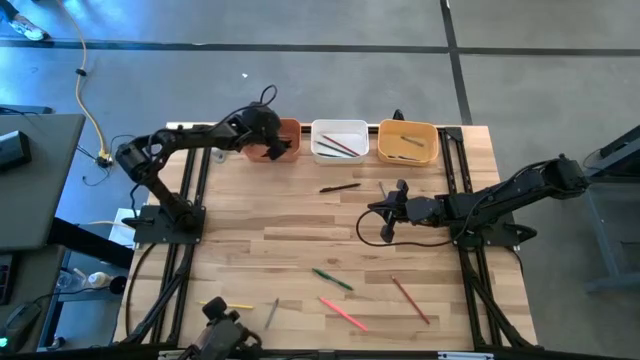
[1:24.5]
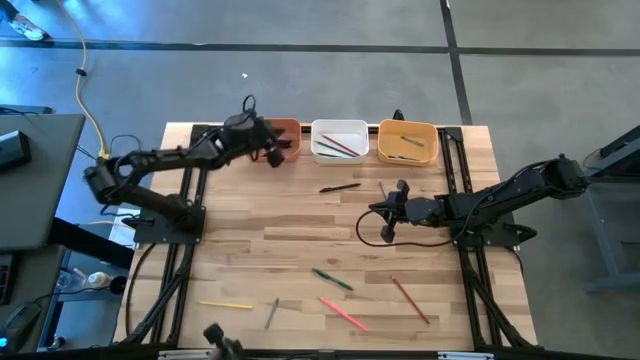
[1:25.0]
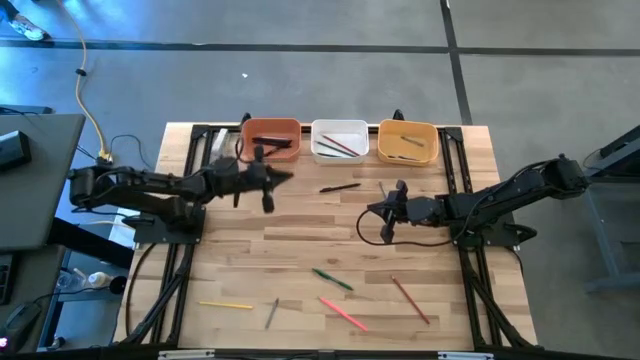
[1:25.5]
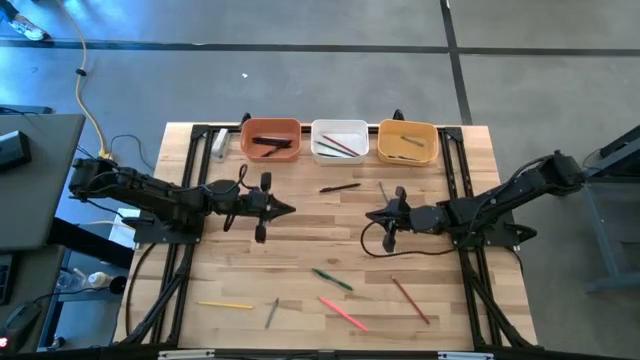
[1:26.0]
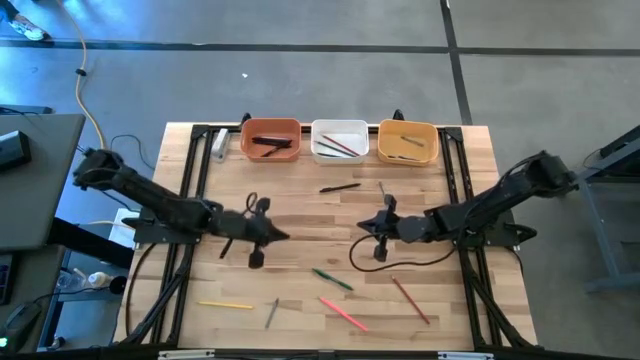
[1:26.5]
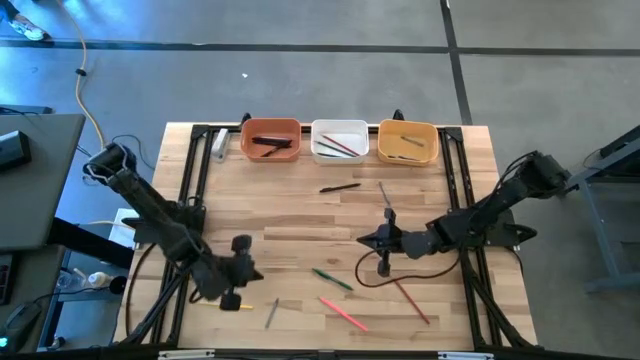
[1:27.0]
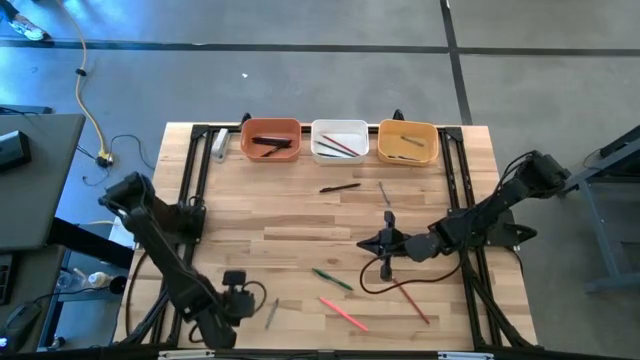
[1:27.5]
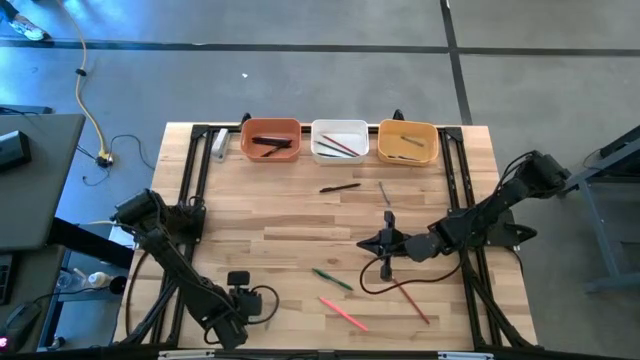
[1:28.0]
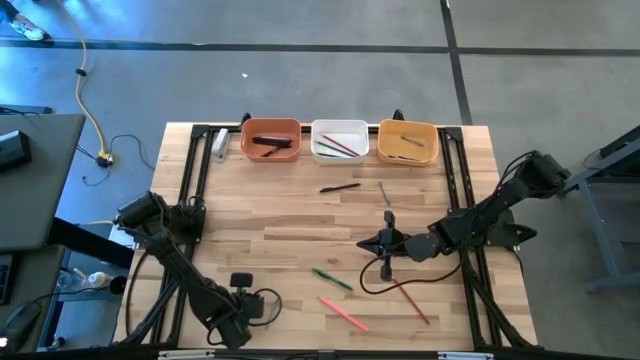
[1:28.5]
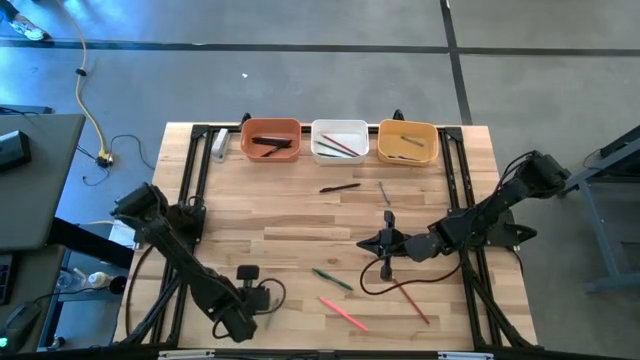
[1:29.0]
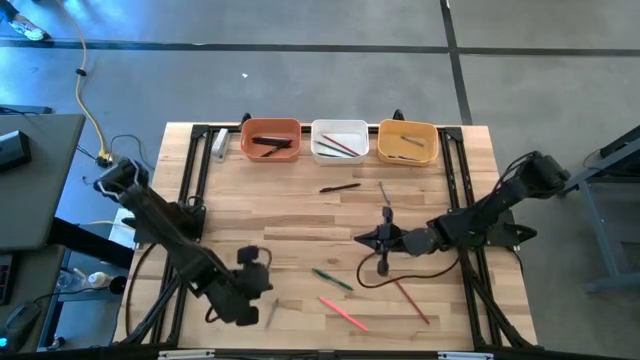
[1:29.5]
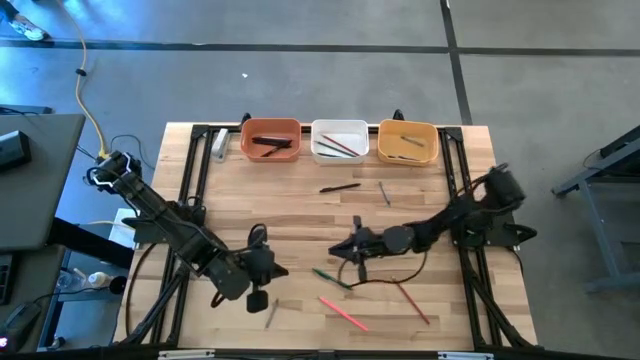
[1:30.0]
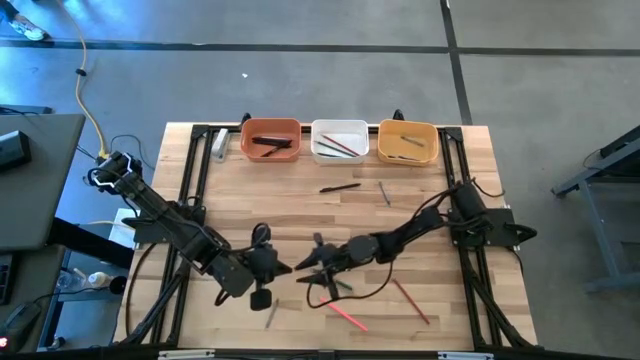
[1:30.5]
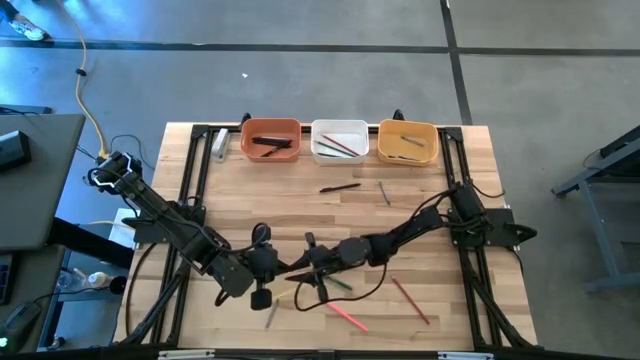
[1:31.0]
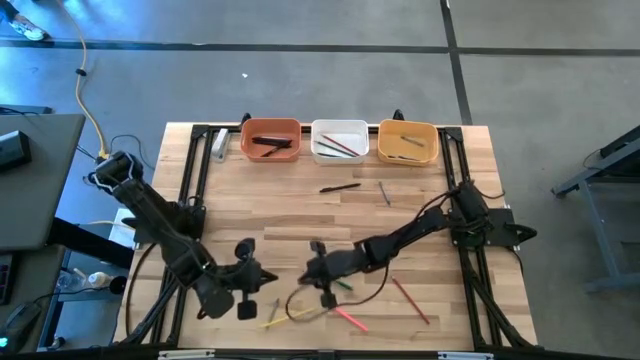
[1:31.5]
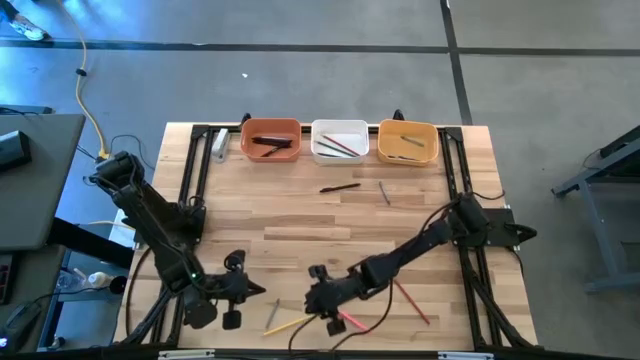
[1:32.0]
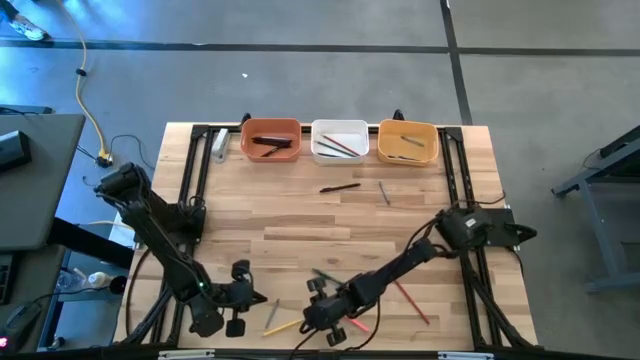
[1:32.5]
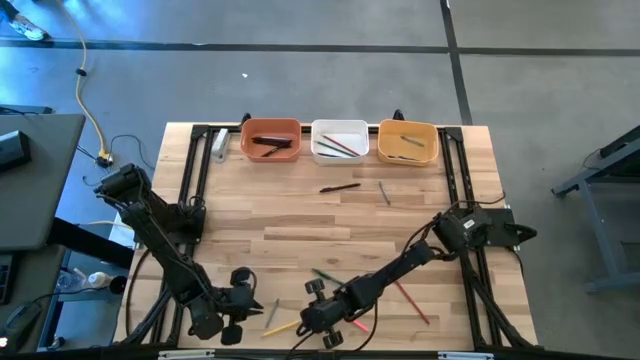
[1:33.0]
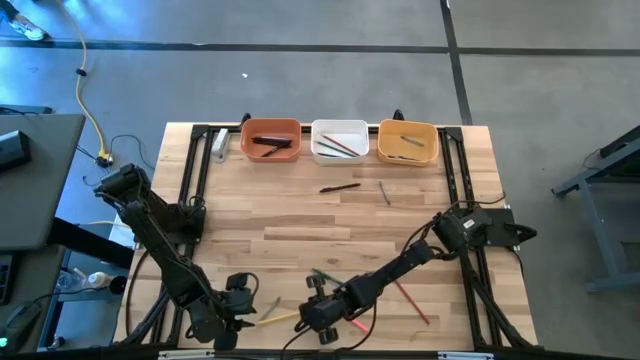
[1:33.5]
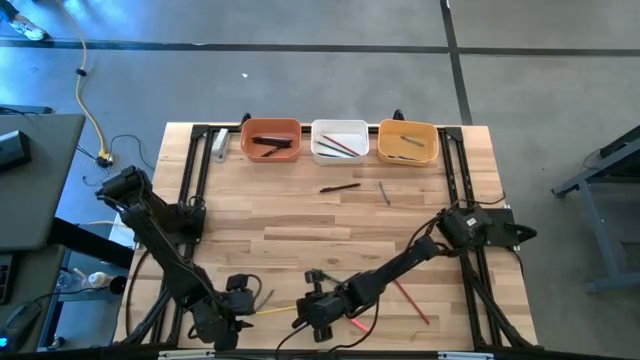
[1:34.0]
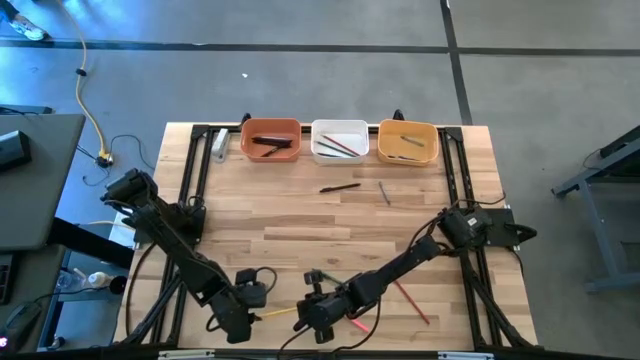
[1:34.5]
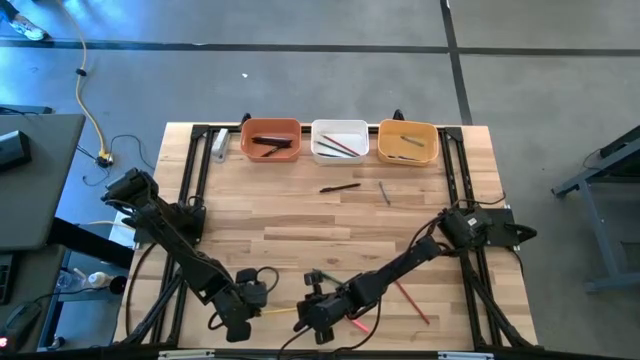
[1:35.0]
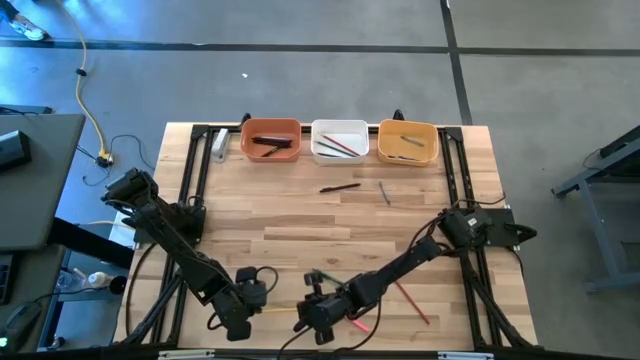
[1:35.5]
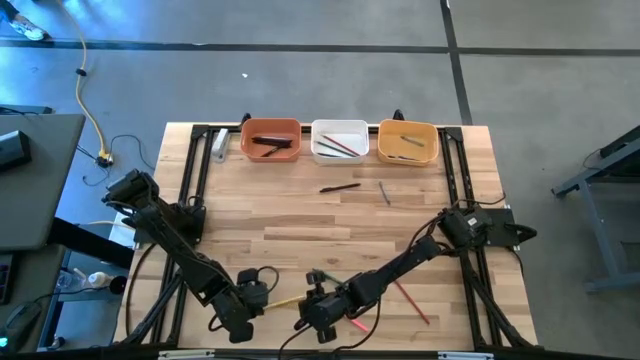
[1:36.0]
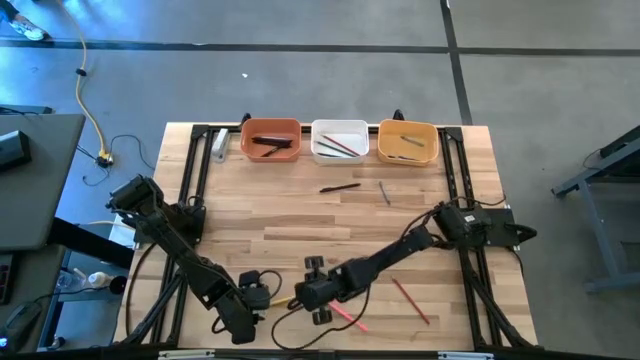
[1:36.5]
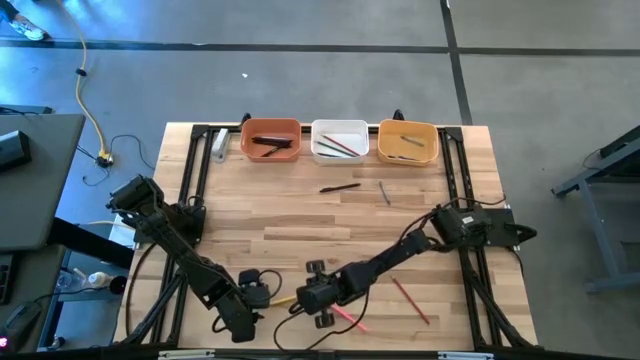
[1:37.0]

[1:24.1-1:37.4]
Task: Sort crayons/erasers/pens/pencils in bins
Put the yellow pencil into the white bin

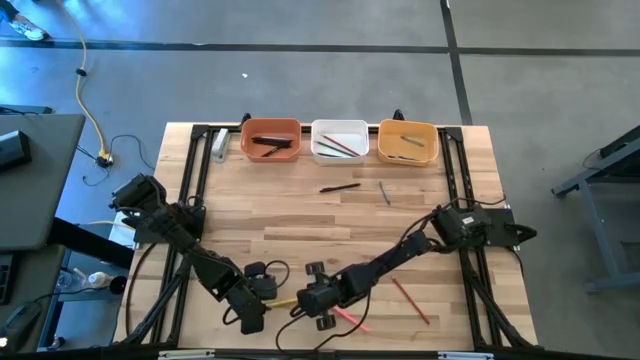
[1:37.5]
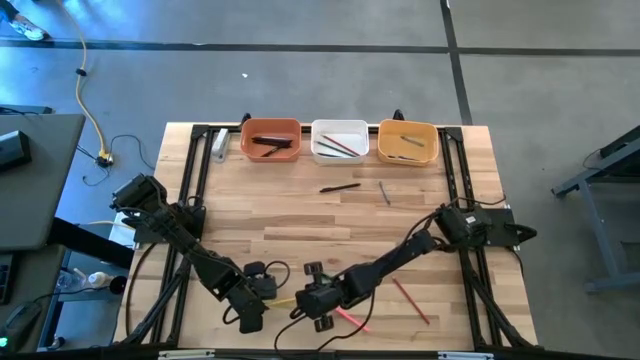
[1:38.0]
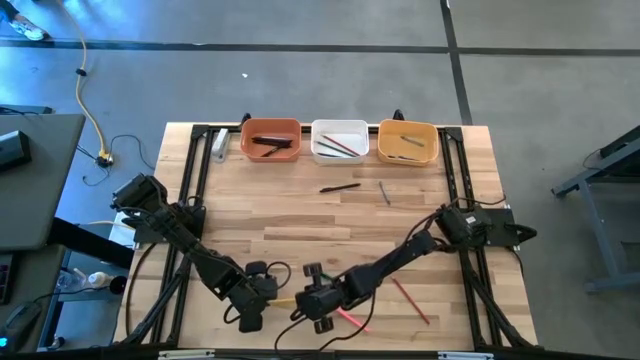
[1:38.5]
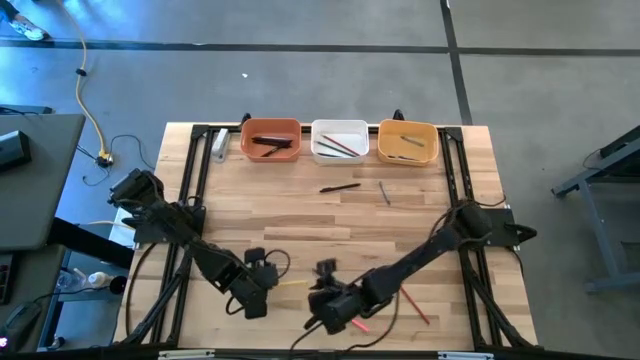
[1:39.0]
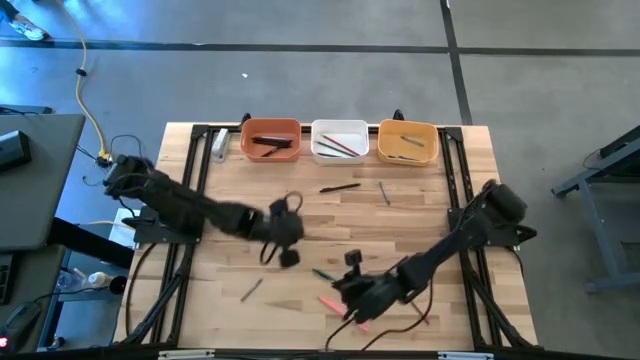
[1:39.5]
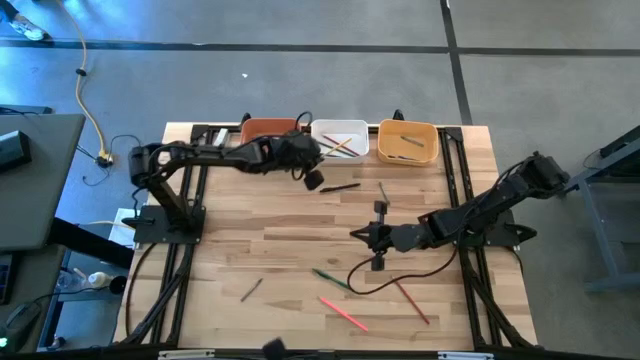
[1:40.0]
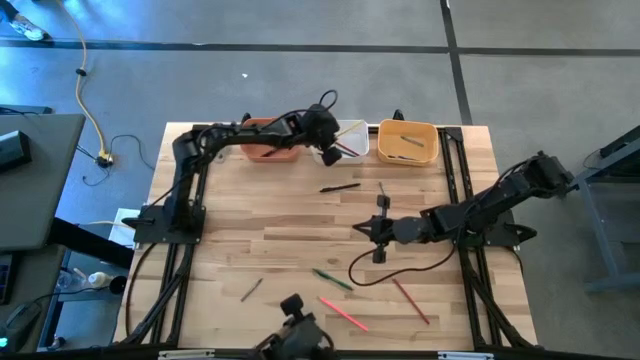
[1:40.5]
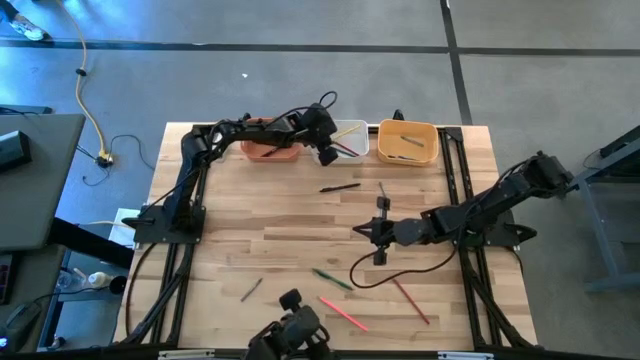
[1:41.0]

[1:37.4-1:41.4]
Put the yellow pencil into the white bin

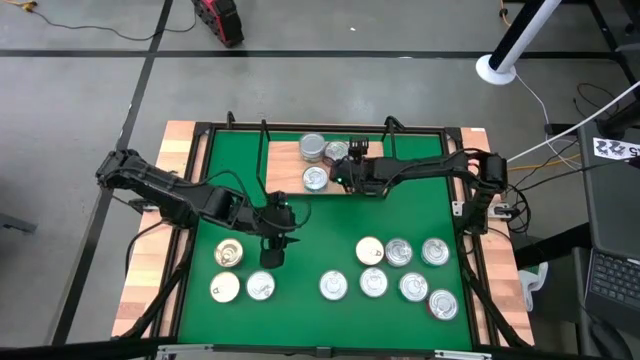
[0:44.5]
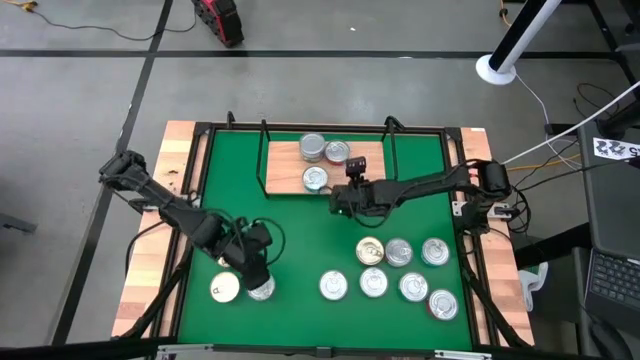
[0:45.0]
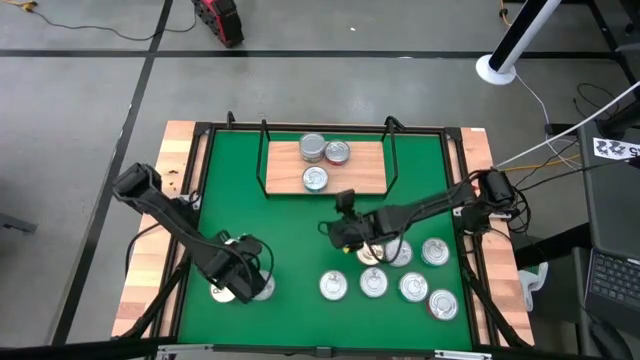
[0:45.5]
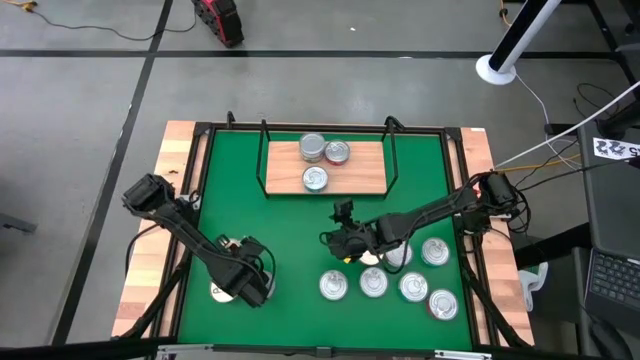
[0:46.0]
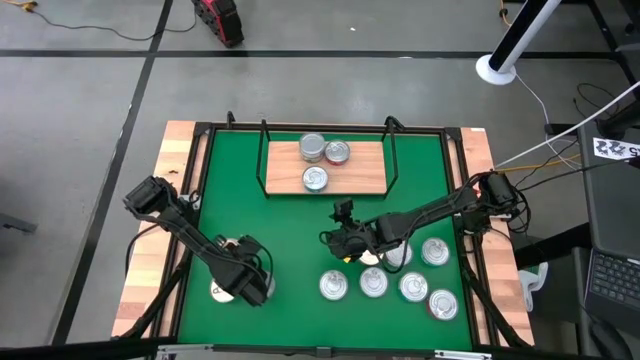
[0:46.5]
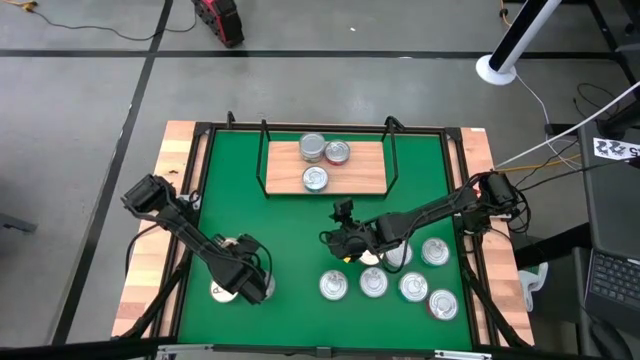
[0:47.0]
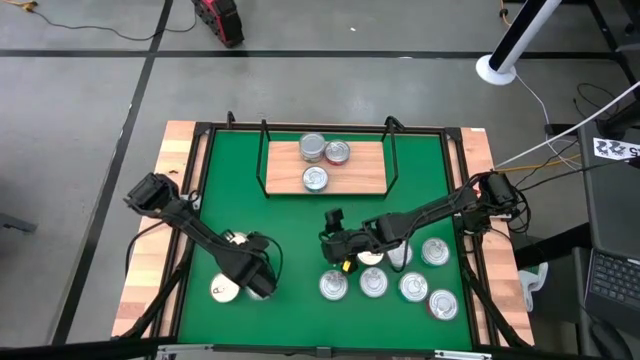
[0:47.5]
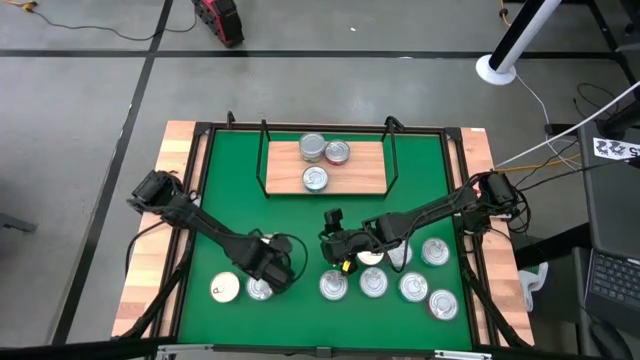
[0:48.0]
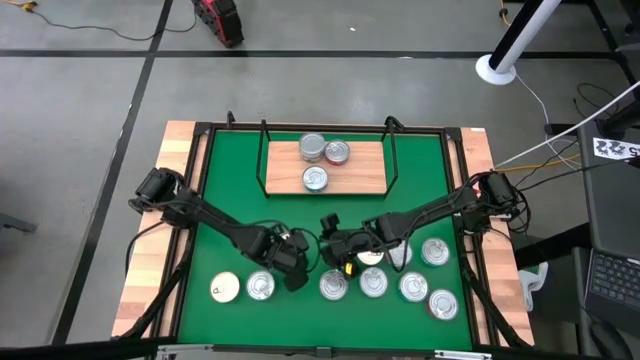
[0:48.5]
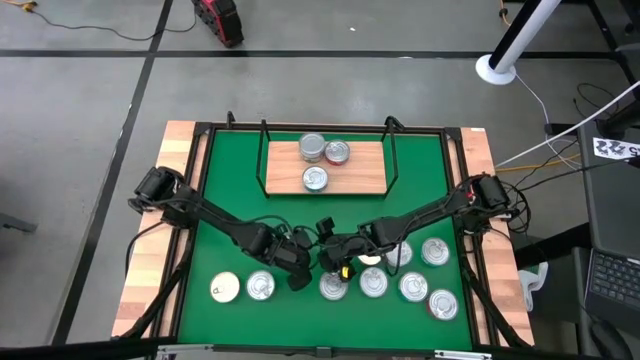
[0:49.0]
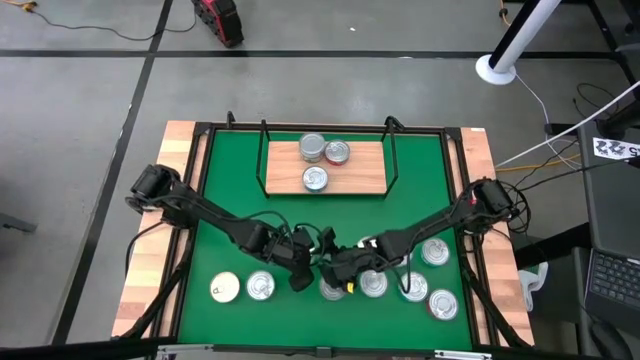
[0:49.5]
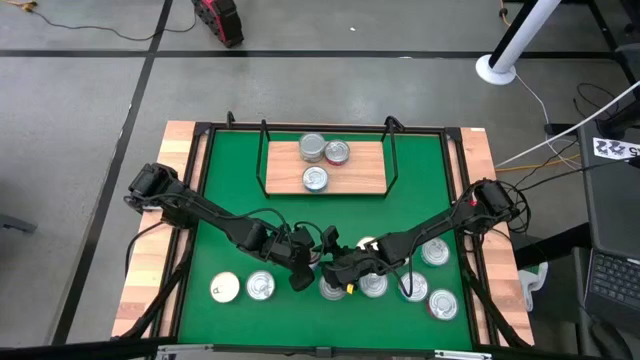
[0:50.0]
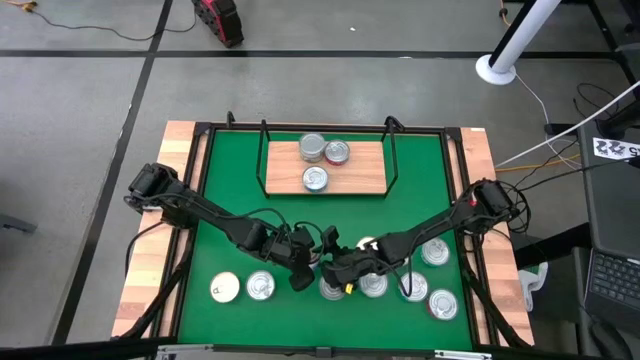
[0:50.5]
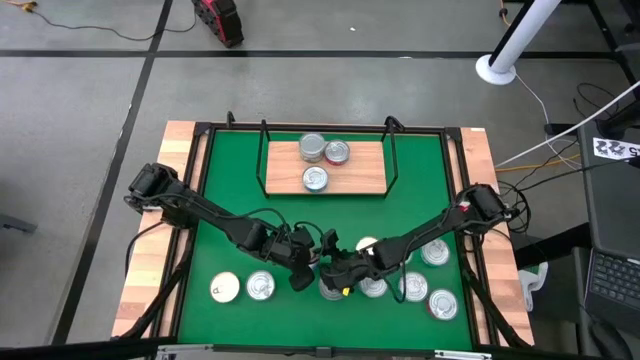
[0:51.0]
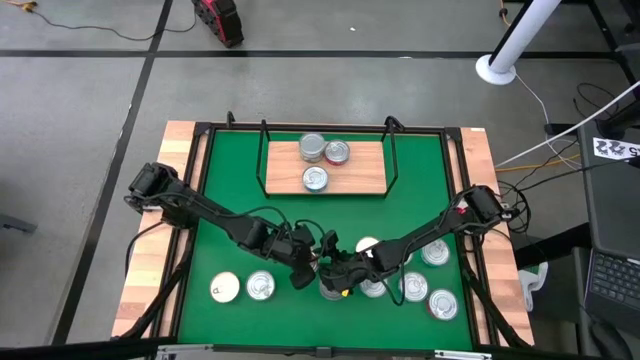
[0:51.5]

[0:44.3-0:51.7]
Task: Stack canned seafood by type on shelf
Put the blue pink tuna can on the shelf
